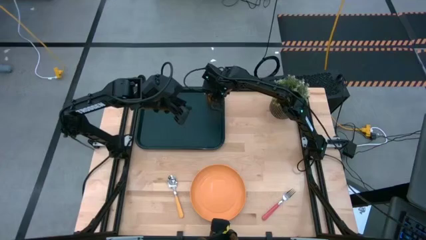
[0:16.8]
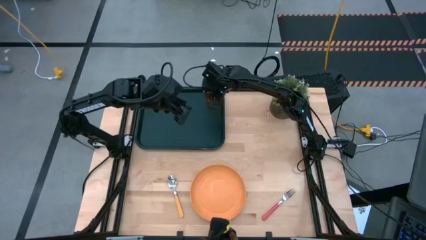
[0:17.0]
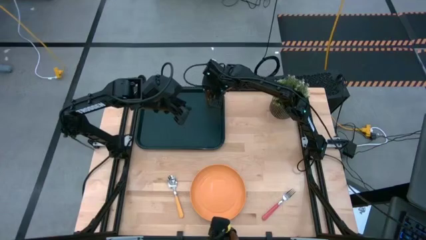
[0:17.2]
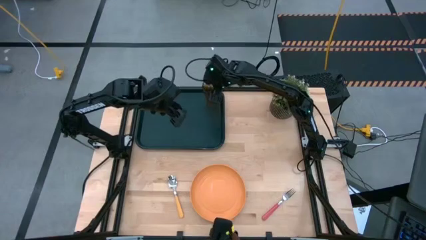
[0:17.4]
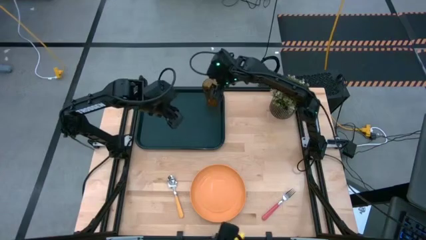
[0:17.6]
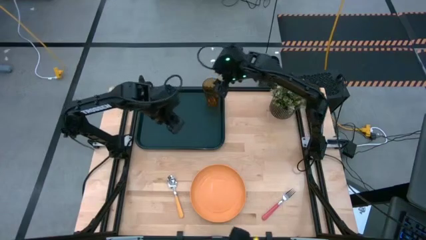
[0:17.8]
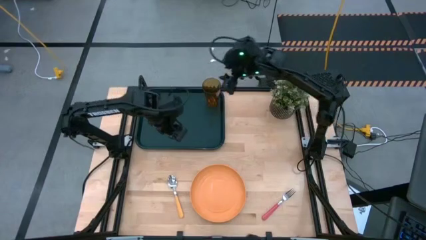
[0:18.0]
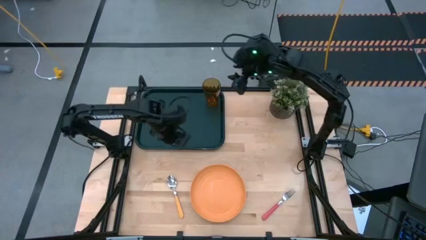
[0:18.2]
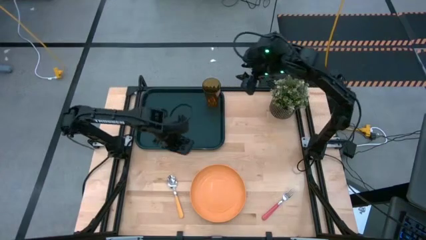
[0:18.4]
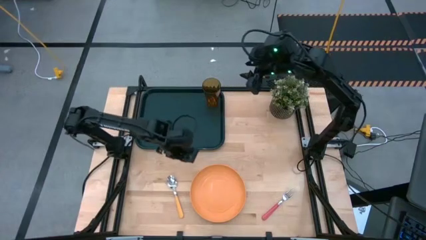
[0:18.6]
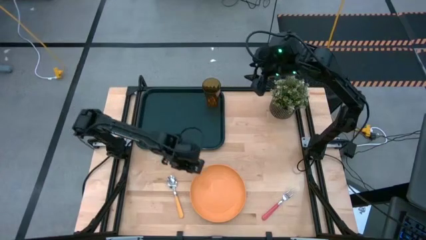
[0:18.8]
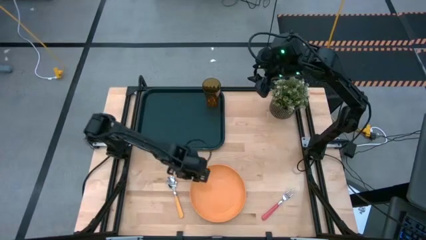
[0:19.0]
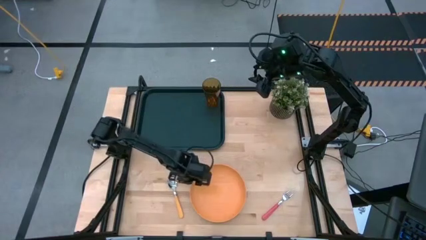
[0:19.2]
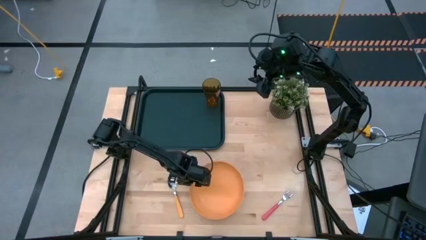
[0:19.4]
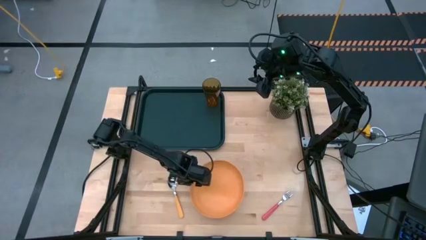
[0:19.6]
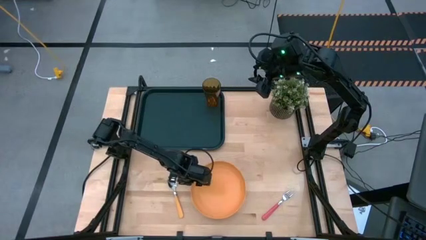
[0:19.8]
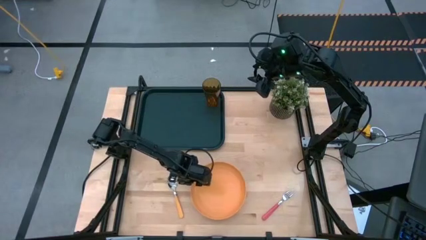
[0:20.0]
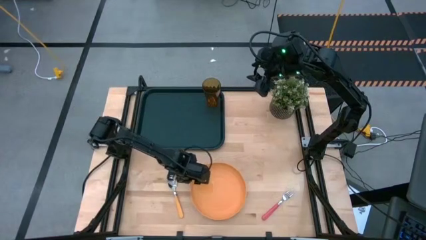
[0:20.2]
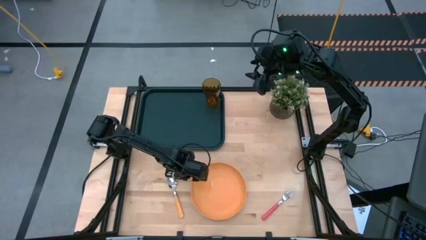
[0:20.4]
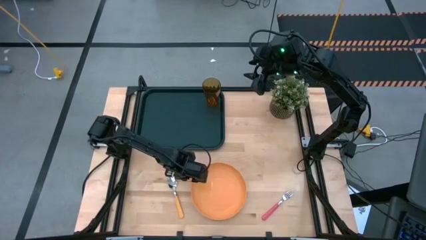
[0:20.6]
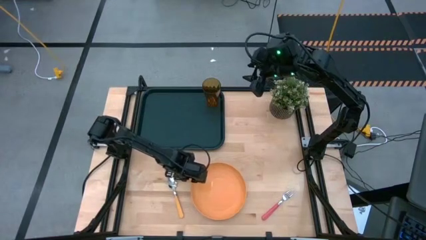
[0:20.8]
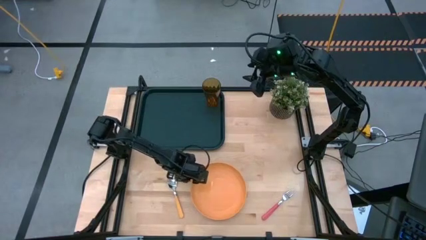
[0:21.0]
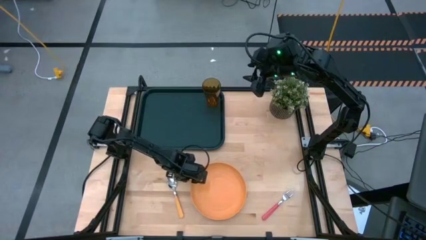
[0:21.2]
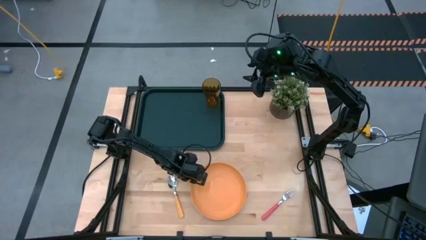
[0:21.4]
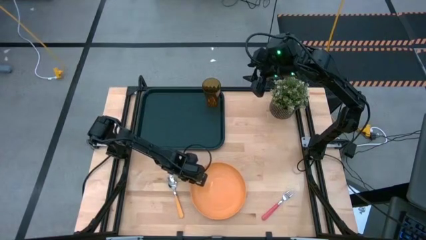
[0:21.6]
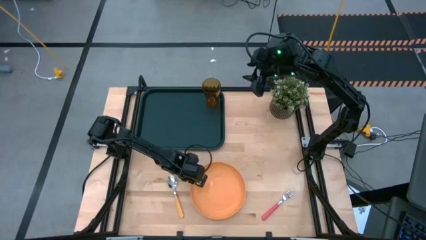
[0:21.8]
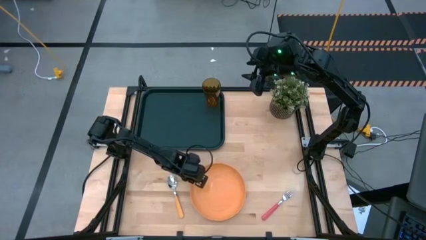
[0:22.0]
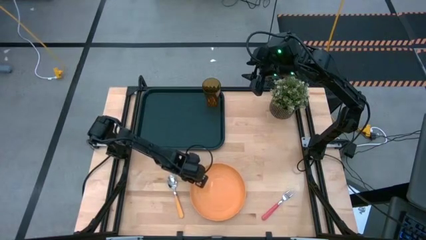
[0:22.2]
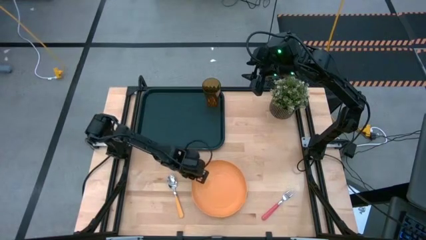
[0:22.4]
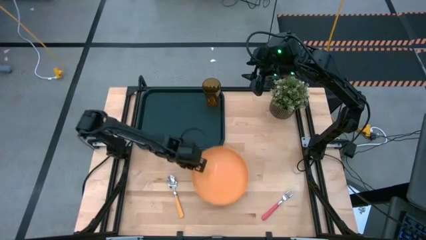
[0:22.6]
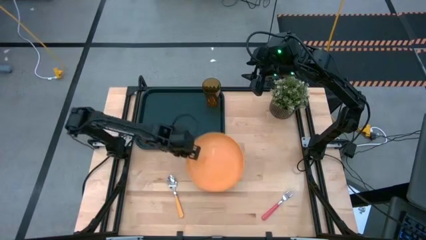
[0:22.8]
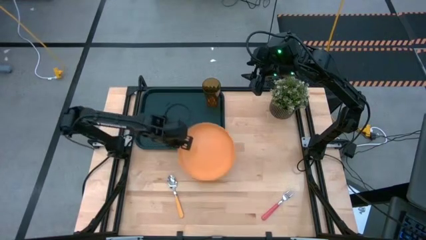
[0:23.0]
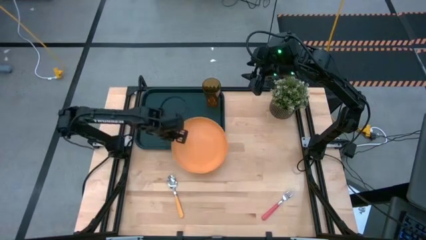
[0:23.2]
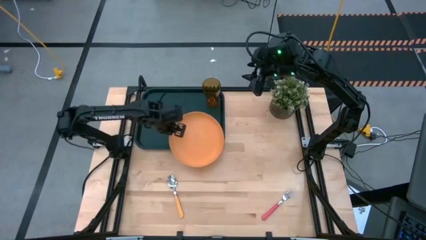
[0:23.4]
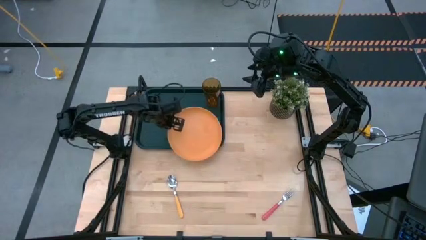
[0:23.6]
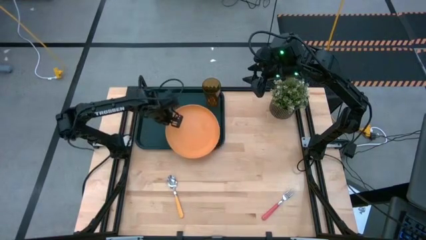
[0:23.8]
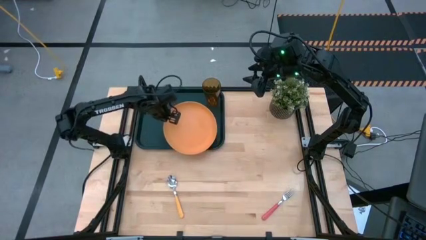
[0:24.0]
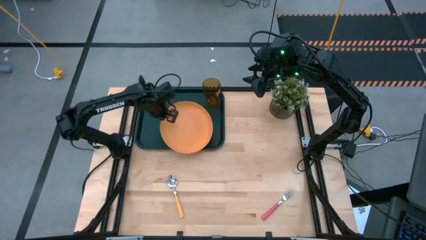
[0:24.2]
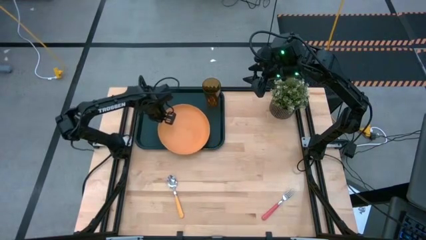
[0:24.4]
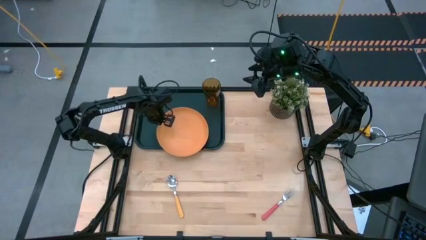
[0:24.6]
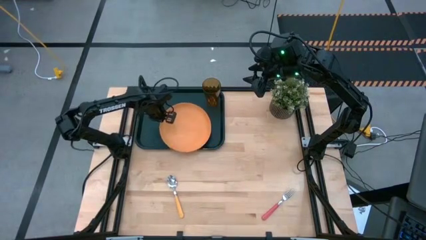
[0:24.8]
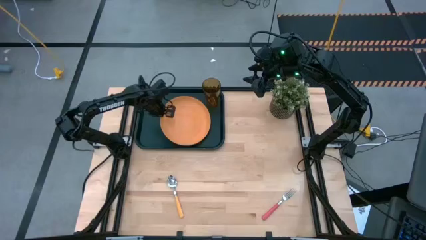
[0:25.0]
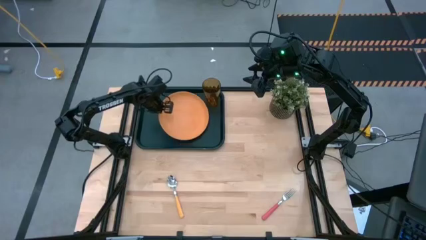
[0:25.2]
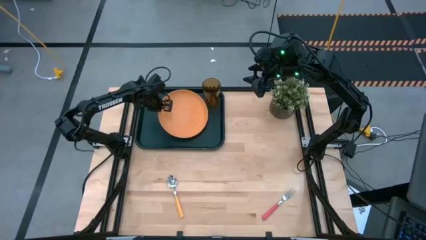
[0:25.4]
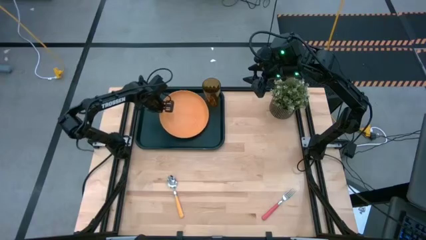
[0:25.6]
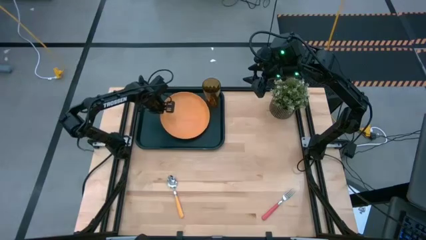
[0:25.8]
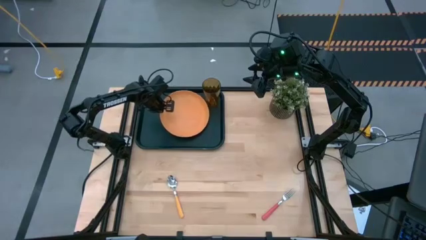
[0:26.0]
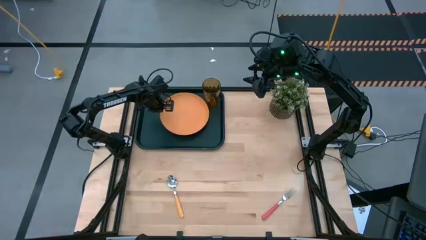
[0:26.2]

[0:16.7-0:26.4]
Task: Pick and place plate/cup/fork/spoon on tray
Put the orange plate on the black serving tray to the bottom left of the yellow cup

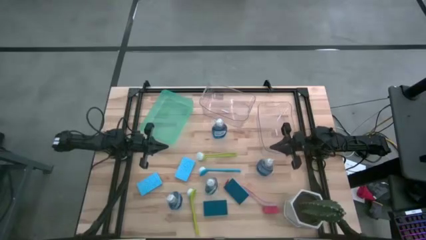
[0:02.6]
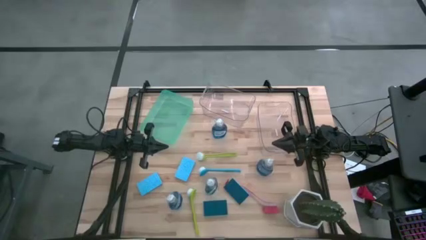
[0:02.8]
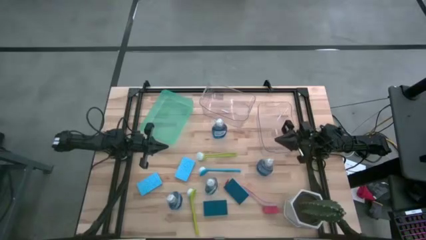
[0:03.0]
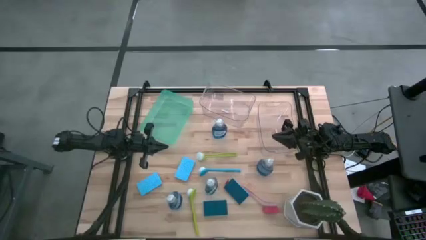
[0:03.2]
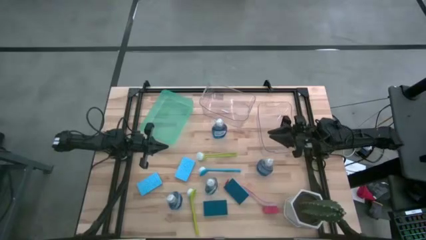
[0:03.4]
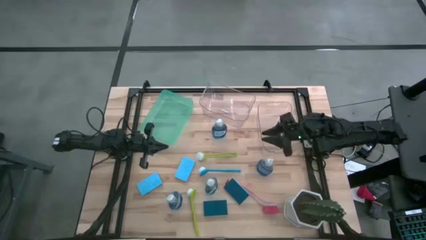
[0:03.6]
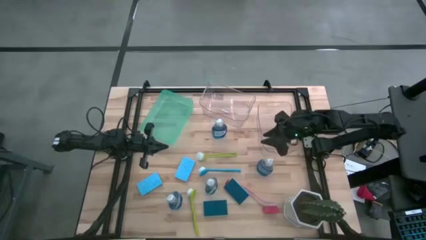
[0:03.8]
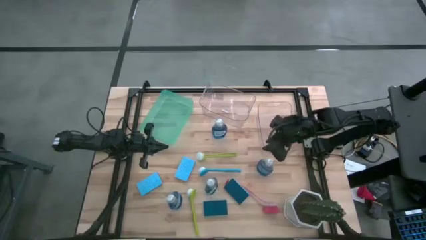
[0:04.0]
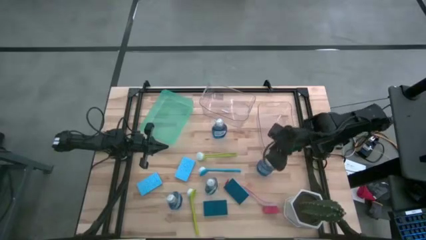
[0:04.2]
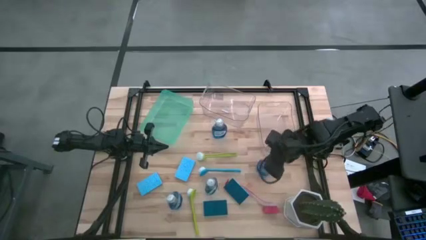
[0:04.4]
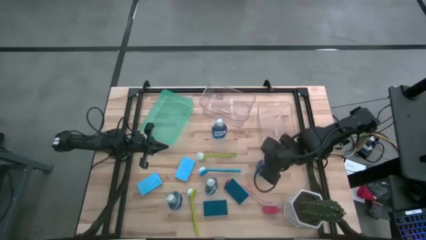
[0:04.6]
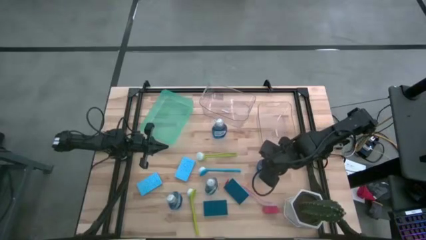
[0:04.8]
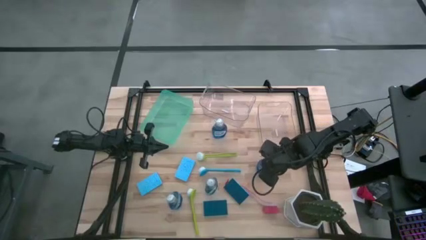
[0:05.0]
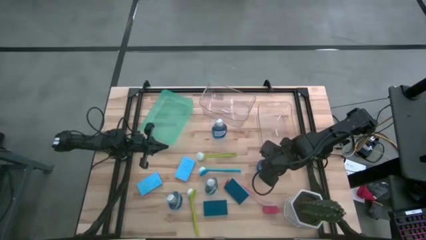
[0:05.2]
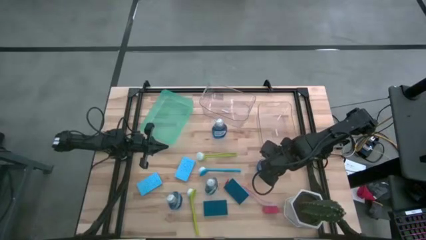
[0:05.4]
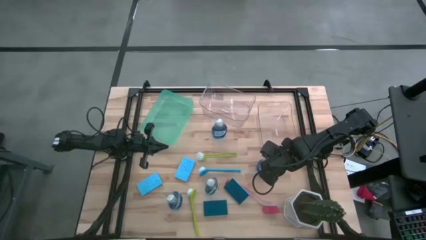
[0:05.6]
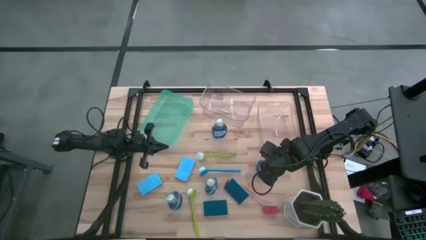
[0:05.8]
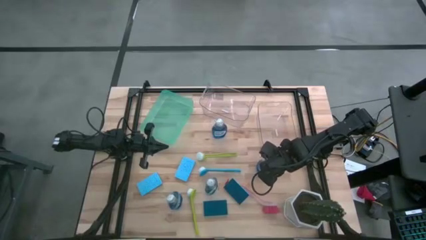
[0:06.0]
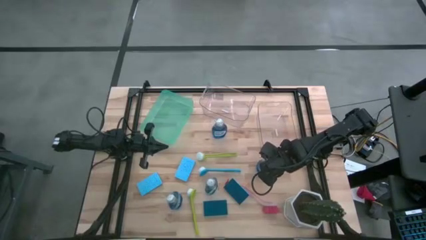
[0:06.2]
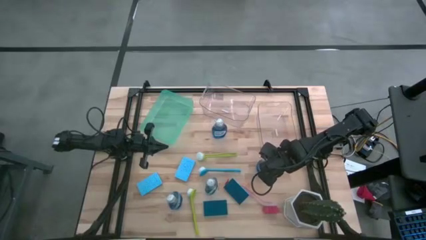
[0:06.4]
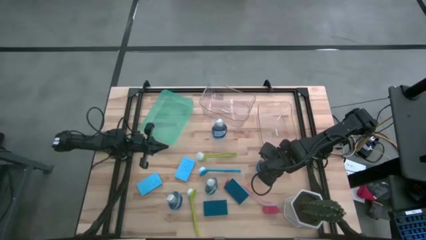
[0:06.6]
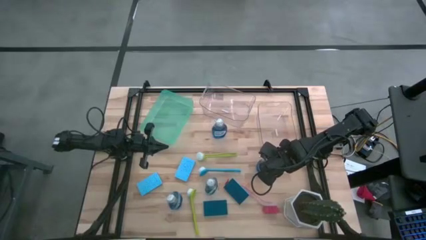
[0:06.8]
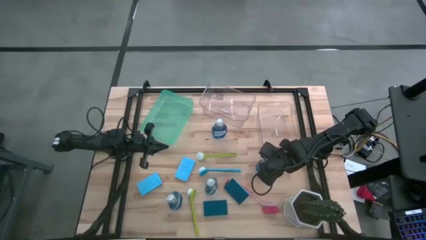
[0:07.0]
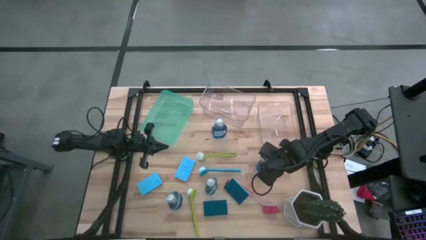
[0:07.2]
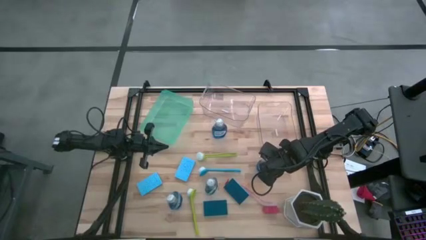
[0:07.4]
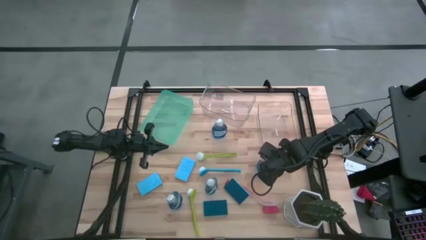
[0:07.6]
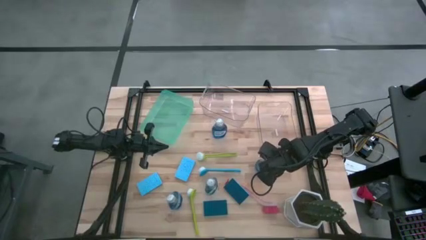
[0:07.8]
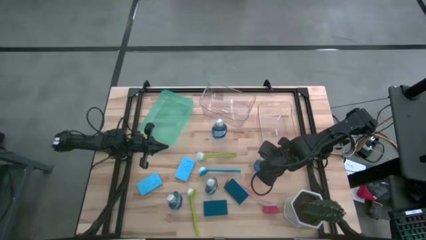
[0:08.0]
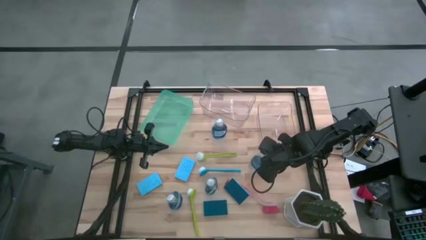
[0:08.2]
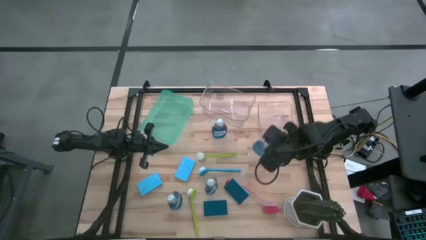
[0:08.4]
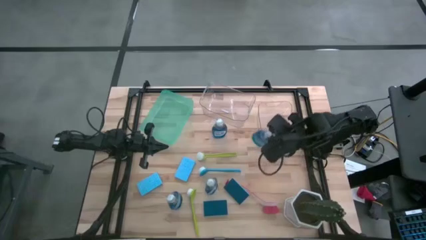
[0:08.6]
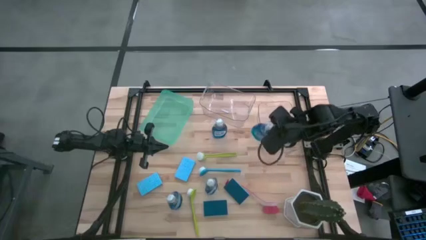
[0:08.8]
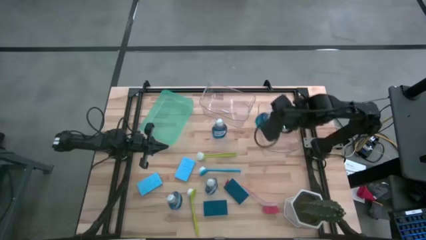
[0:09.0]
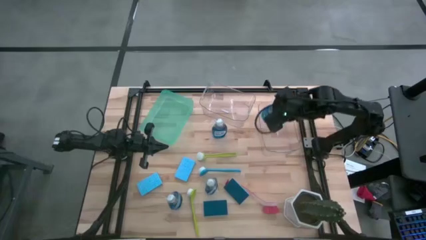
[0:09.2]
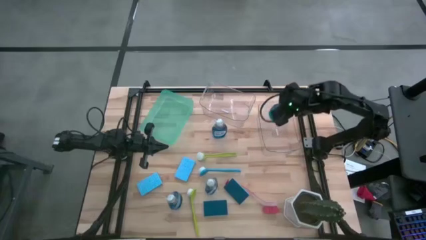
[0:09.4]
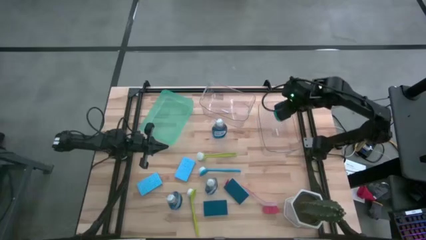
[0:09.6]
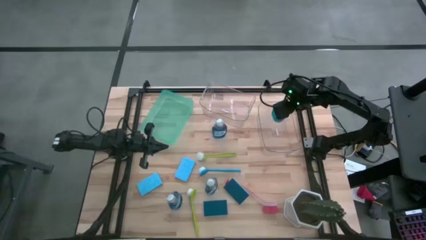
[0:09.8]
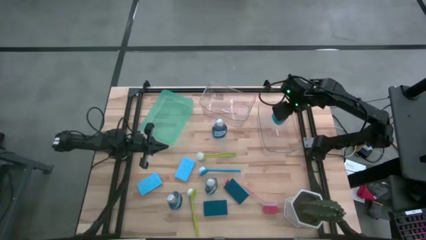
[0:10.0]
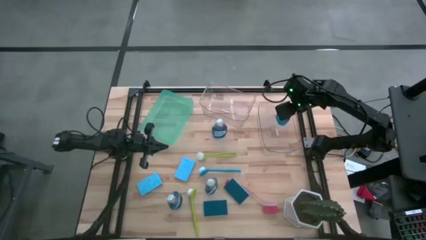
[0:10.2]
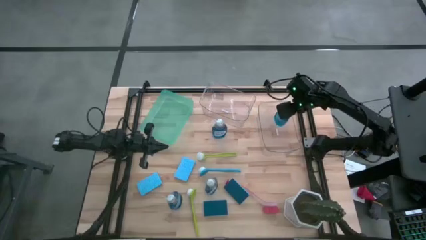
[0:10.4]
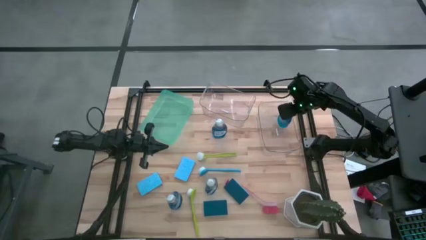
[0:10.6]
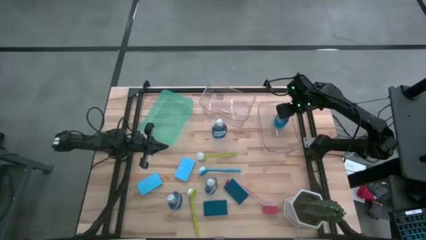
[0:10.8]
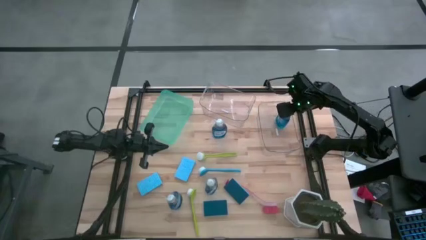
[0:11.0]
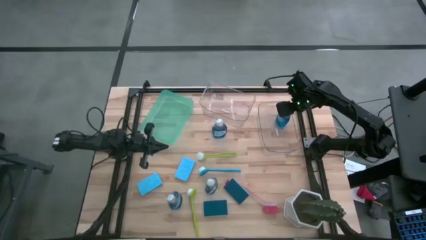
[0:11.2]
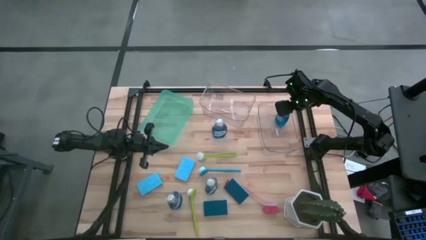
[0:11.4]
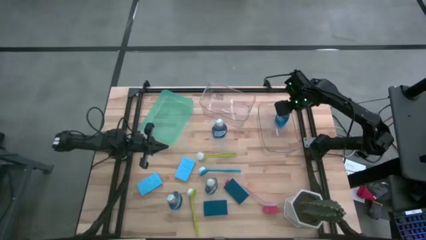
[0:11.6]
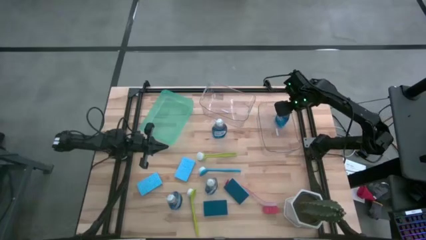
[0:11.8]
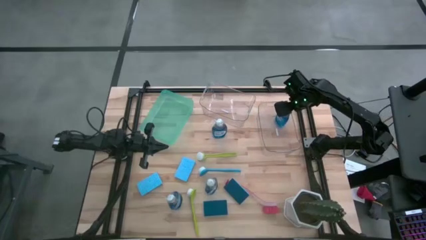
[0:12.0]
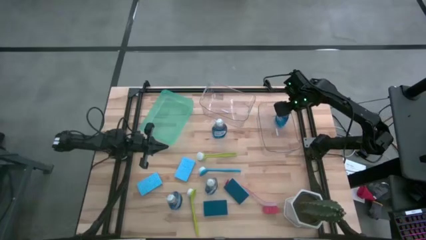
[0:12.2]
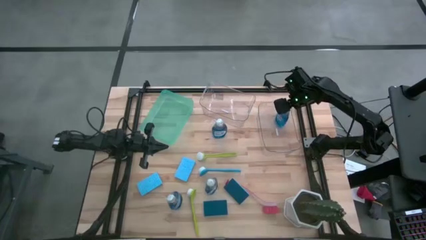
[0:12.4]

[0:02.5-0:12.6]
Task: Pick & Place Kitchen Sink Supplies
Put the blue dishwashing liquid bottle into the right transparent bin
